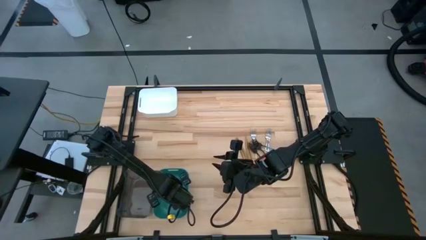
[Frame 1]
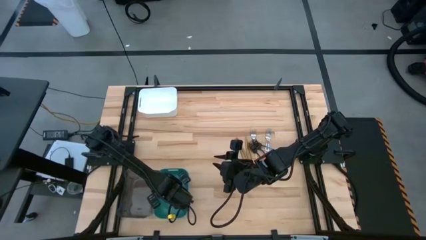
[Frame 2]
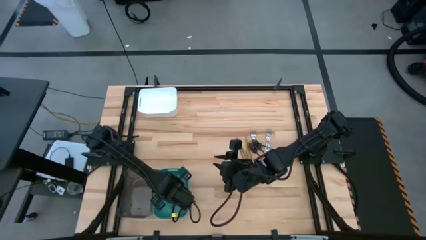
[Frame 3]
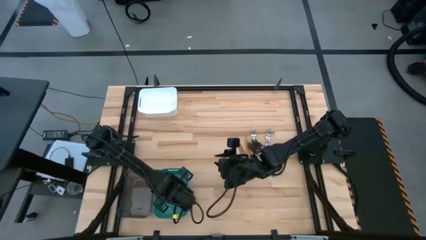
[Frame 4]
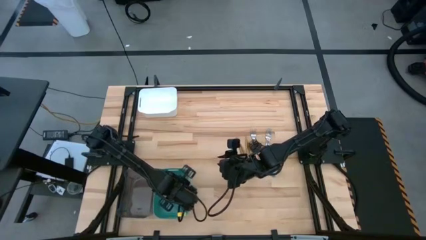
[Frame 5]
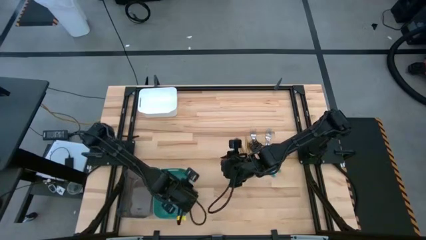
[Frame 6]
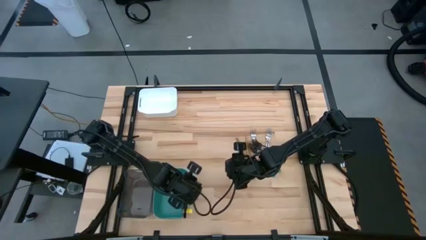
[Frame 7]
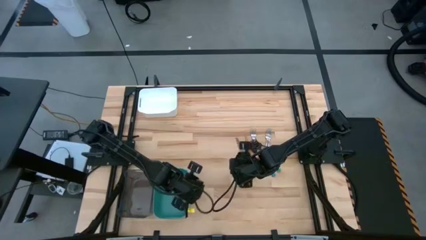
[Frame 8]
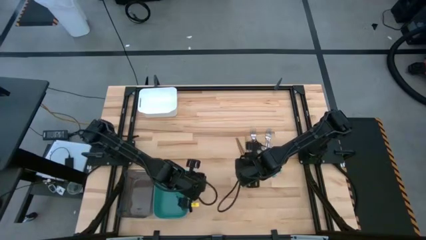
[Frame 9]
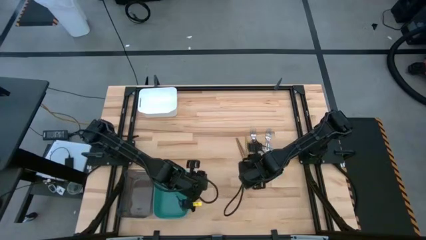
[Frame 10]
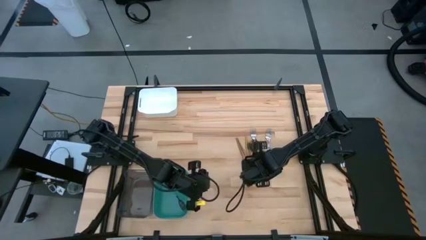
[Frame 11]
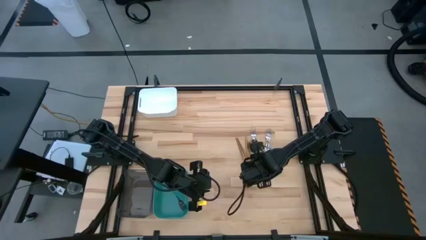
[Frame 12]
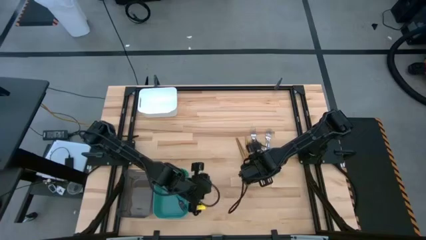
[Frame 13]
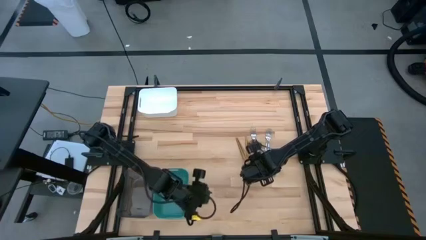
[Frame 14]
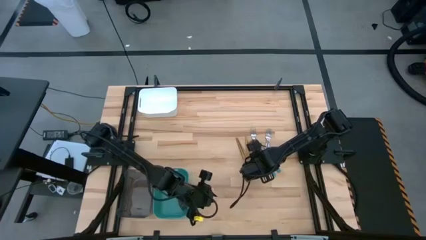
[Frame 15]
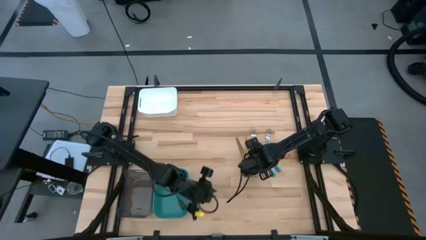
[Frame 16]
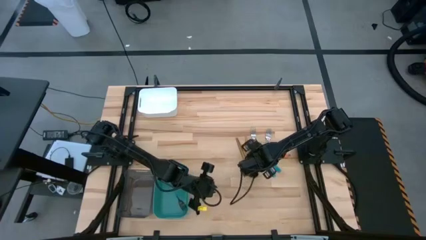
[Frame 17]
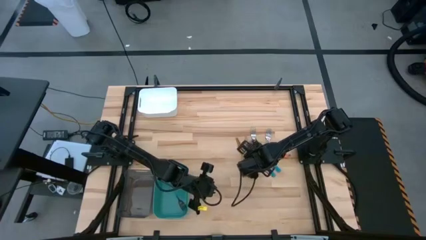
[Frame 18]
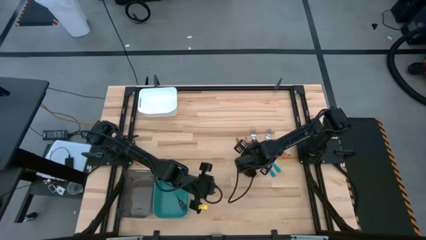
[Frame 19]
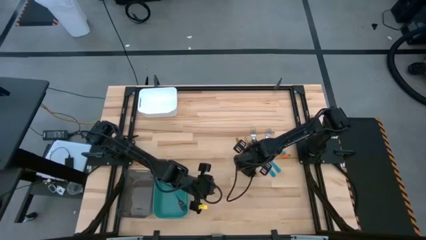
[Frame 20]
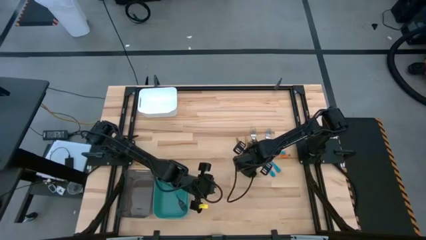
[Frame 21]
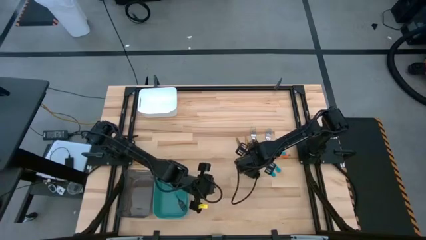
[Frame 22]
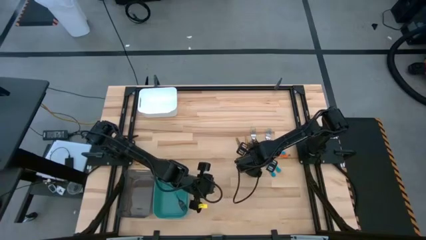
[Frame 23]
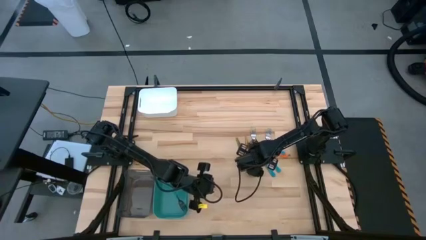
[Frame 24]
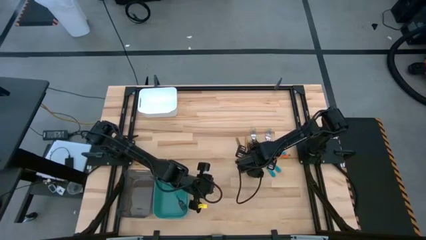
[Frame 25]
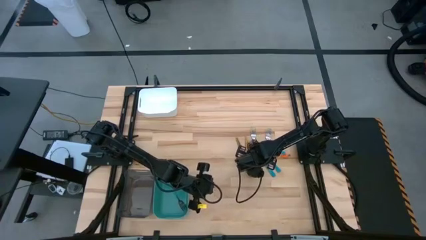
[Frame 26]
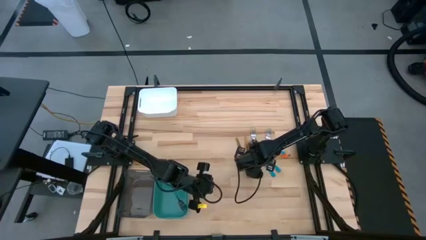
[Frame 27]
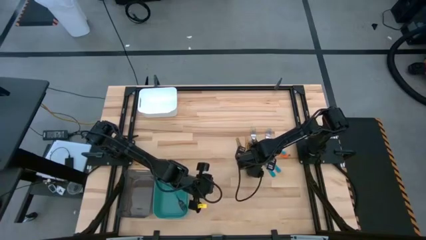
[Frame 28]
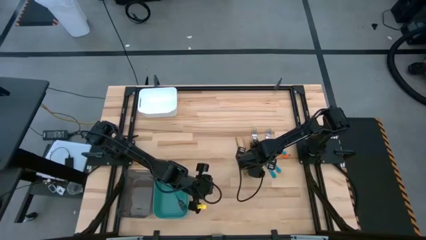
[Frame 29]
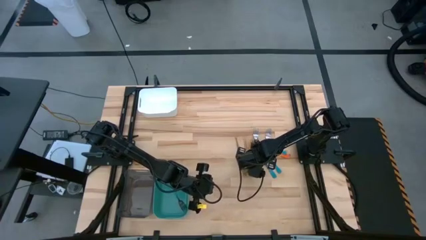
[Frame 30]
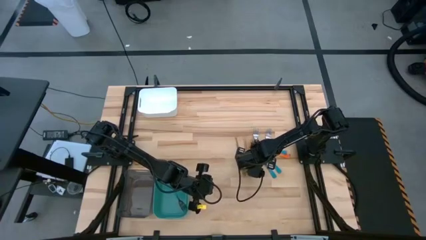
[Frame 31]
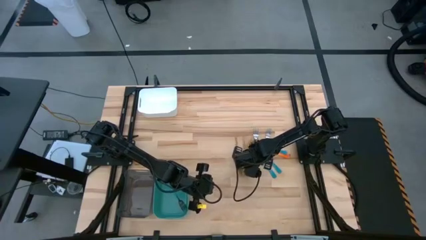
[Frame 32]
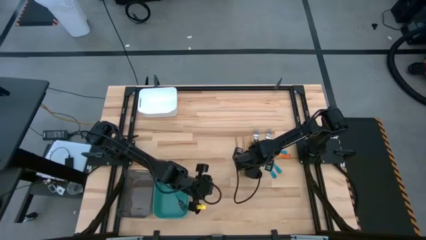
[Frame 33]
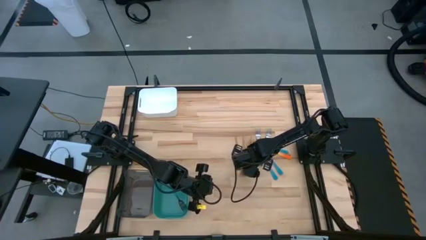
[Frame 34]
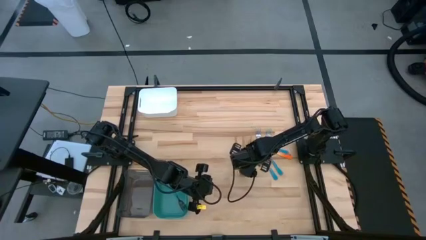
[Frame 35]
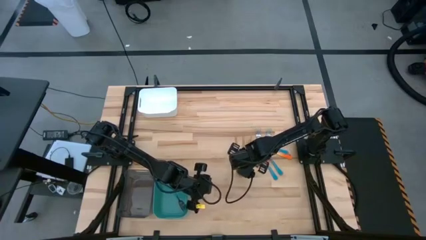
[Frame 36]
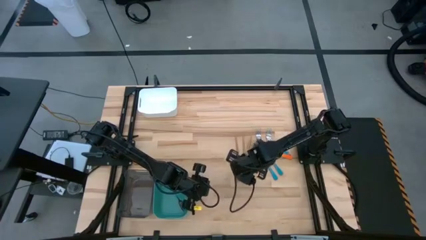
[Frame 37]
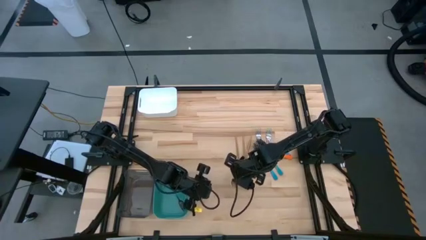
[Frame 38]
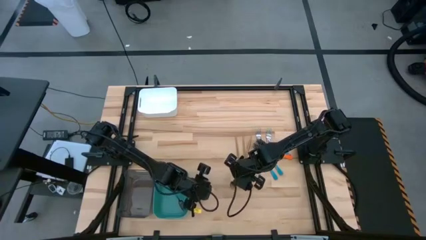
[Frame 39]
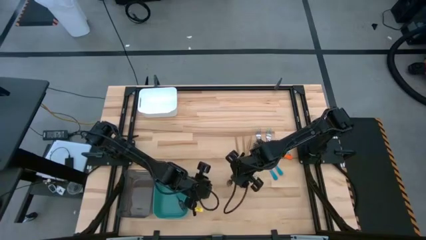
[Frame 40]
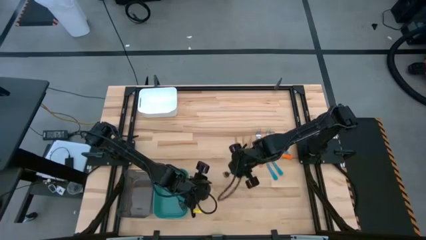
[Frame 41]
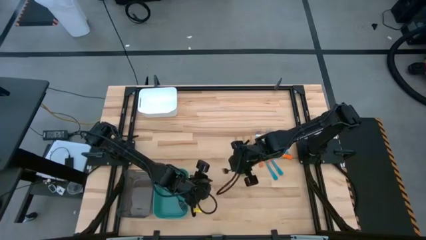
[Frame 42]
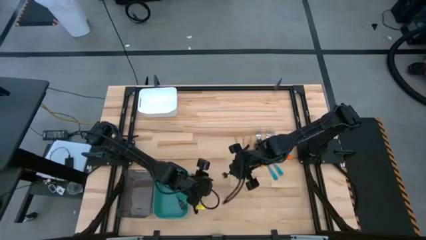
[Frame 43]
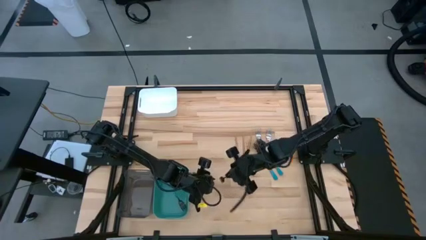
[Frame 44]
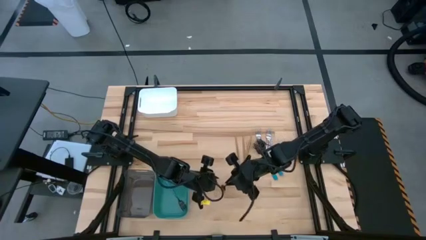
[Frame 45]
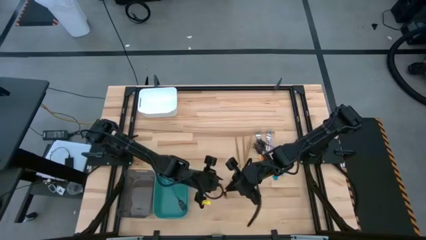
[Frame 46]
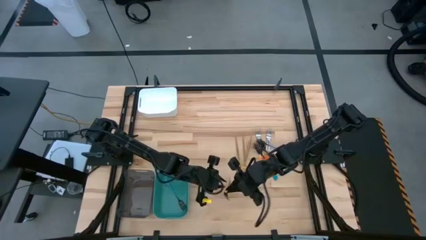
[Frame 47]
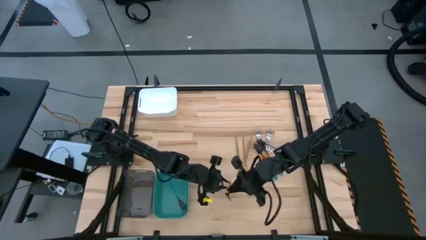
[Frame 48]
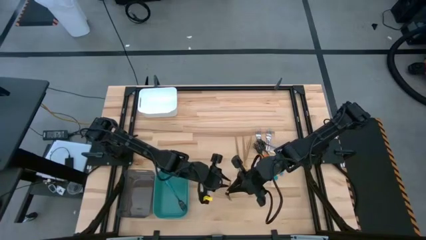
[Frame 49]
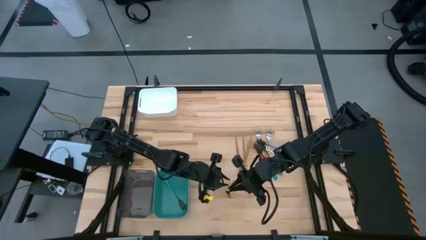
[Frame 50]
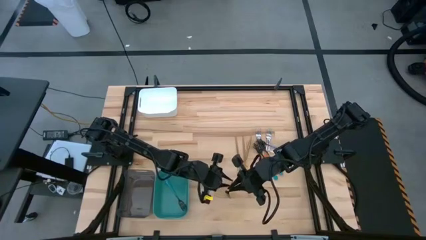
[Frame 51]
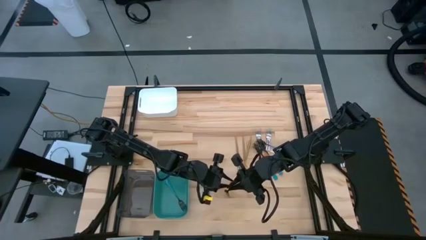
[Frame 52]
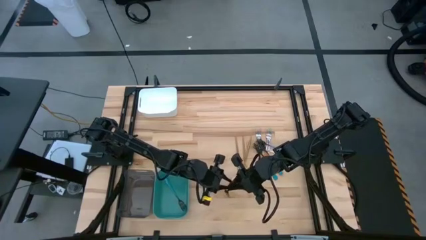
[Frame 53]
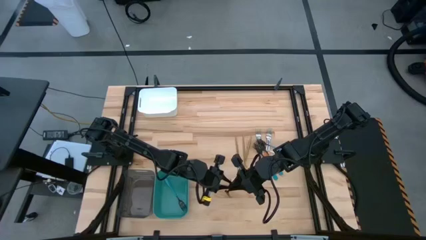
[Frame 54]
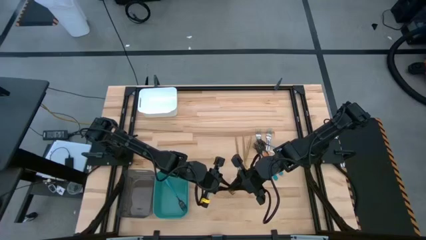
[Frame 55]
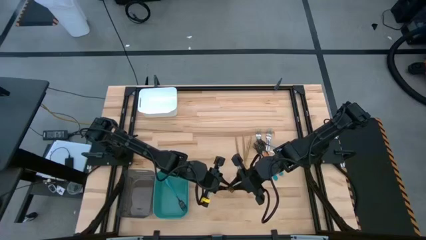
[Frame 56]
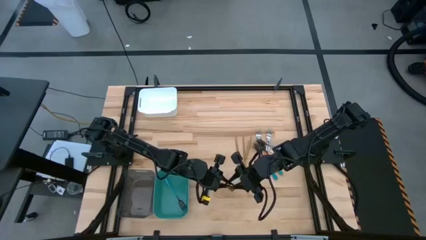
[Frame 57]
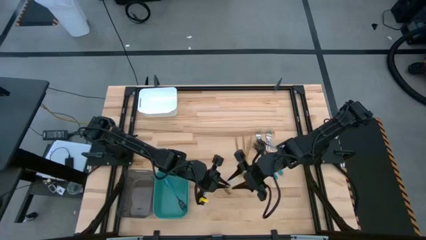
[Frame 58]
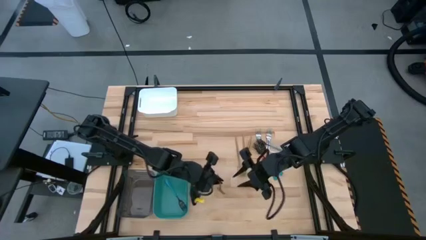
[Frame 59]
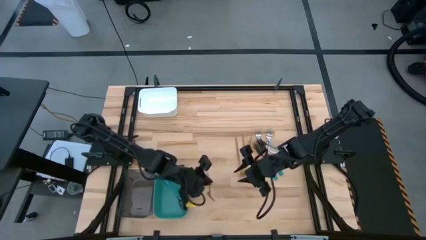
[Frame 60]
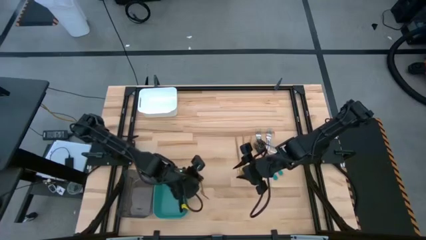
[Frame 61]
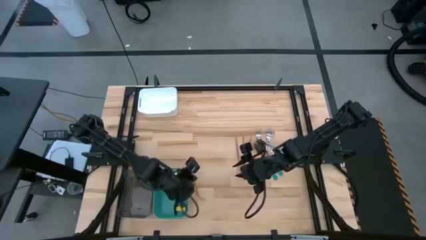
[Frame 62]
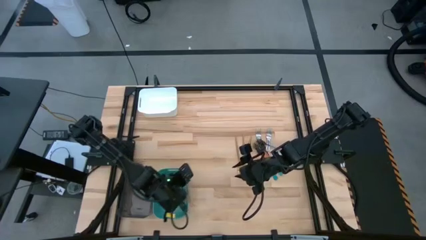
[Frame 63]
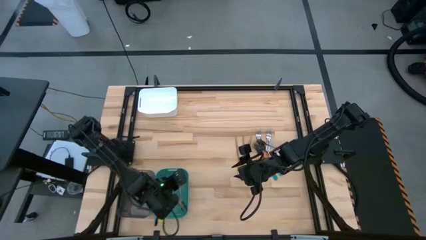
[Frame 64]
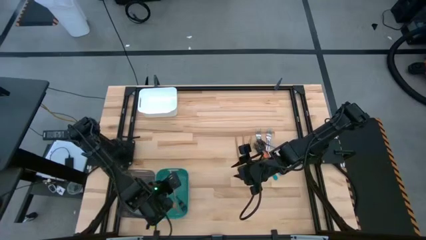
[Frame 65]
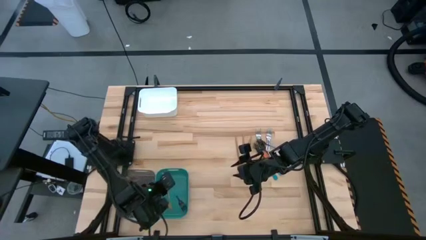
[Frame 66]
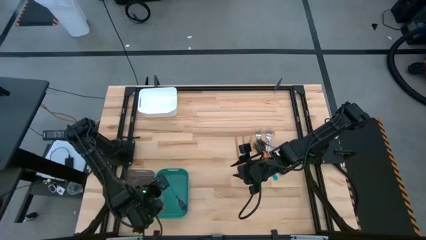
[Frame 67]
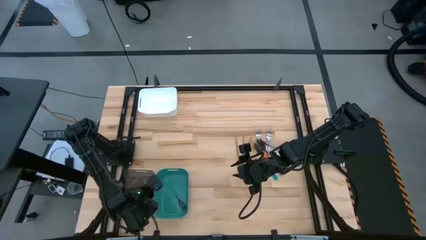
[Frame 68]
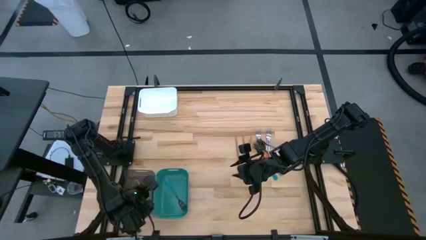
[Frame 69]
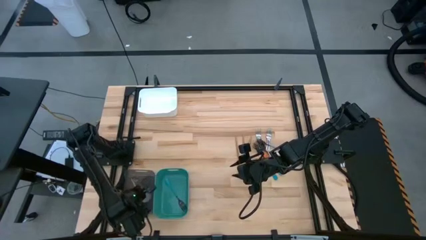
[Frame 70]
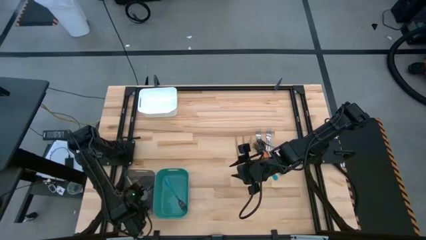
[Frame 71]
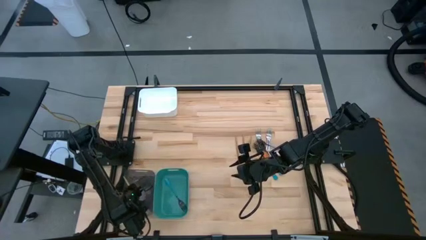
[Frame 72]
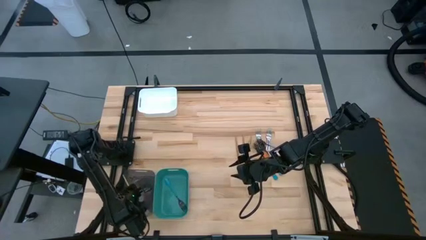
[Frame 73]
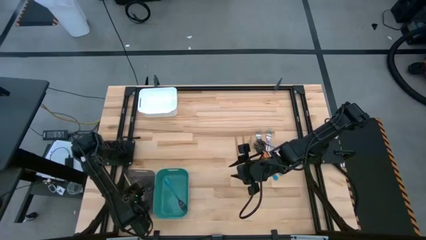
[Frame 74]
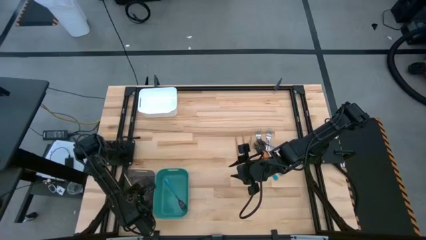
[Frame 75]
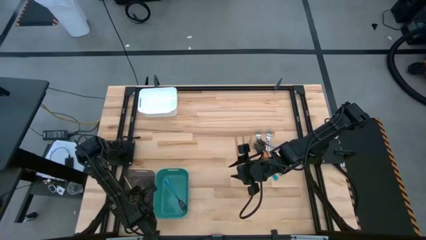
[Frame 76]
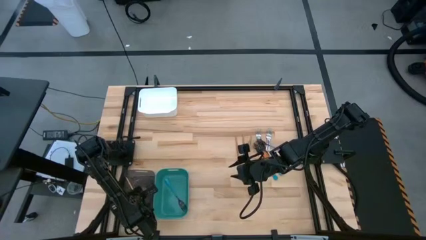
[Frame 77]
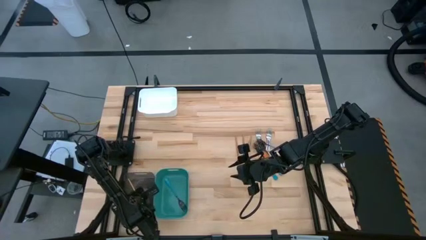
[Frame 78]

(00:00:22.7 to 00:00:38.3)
Task: Sort silverware by color (type)
Put the gold fork into the black bin
